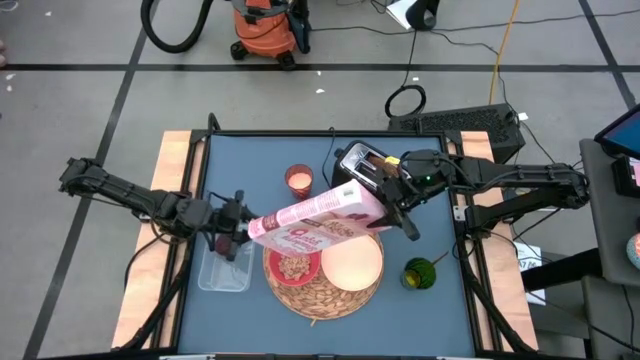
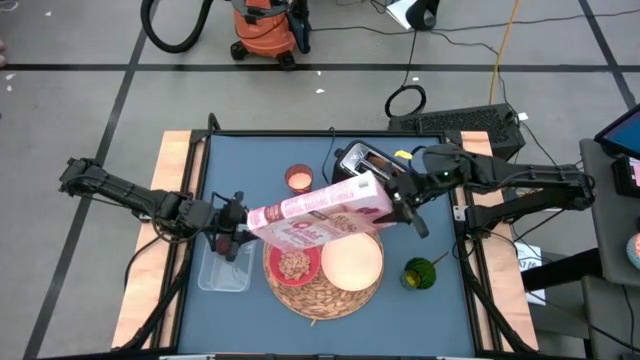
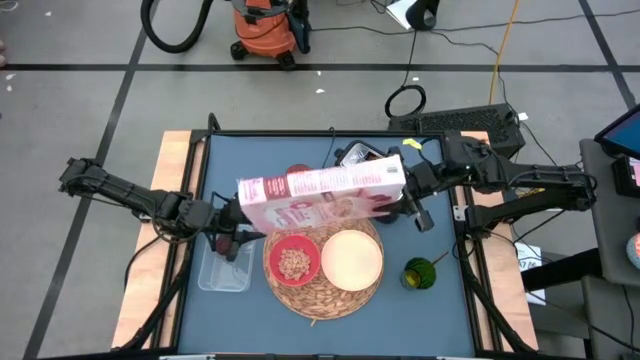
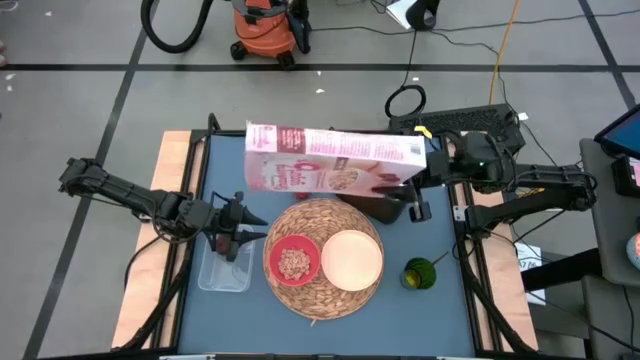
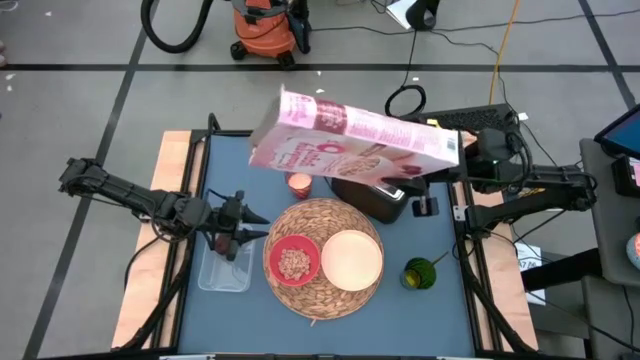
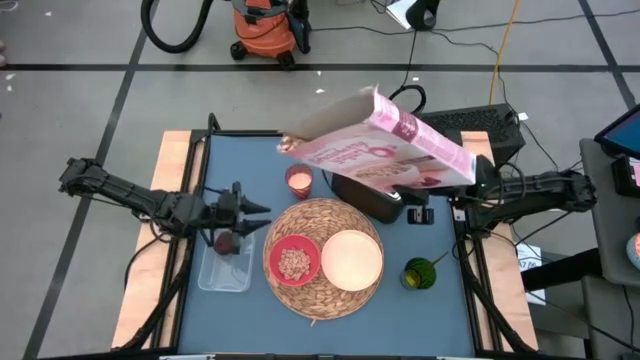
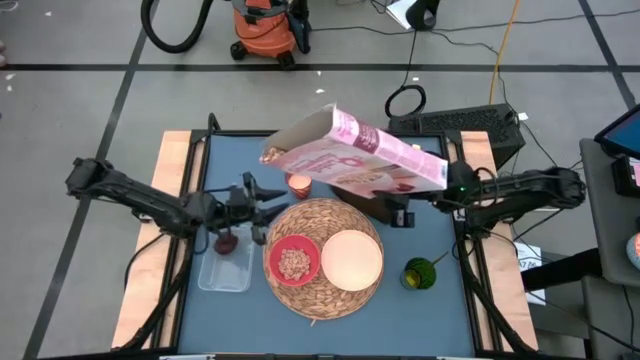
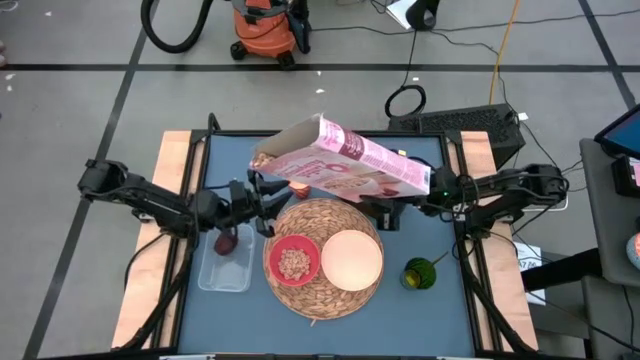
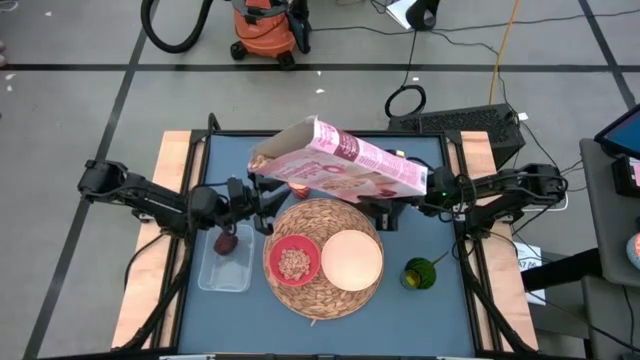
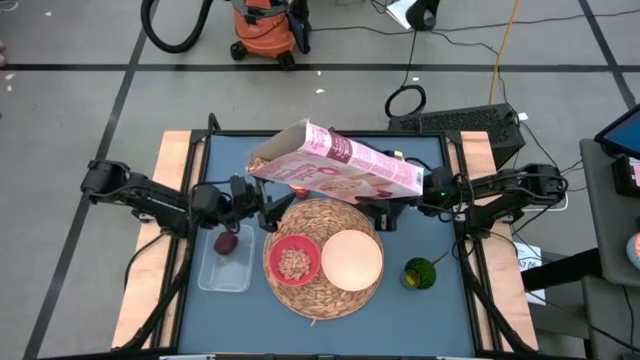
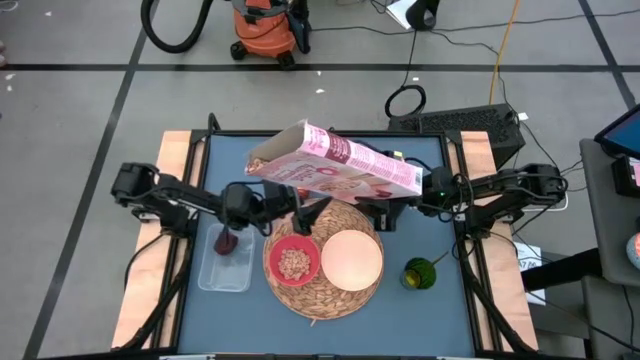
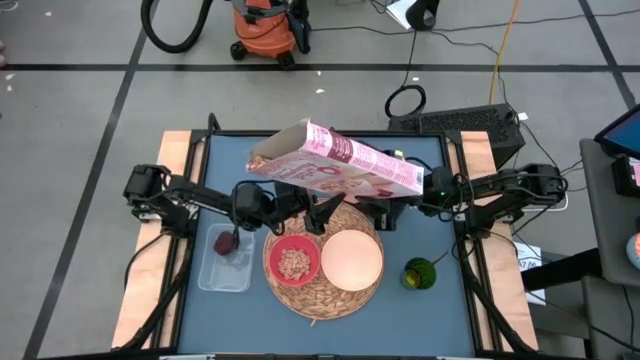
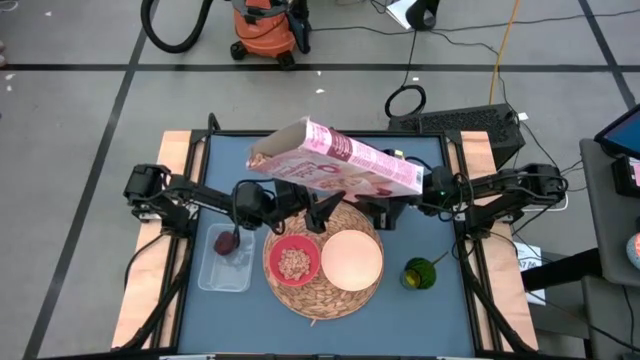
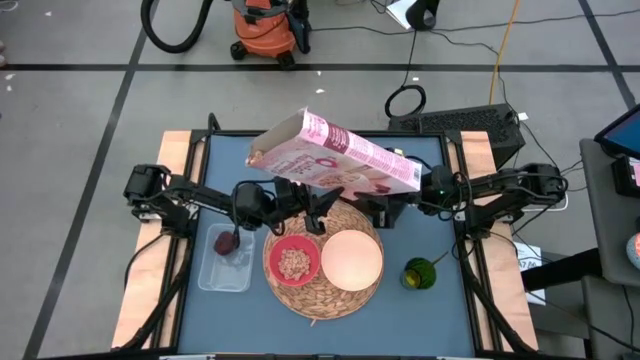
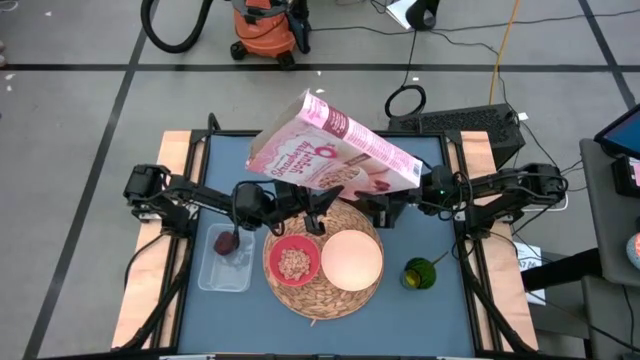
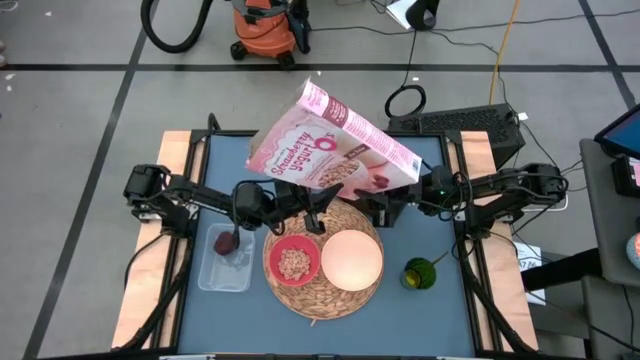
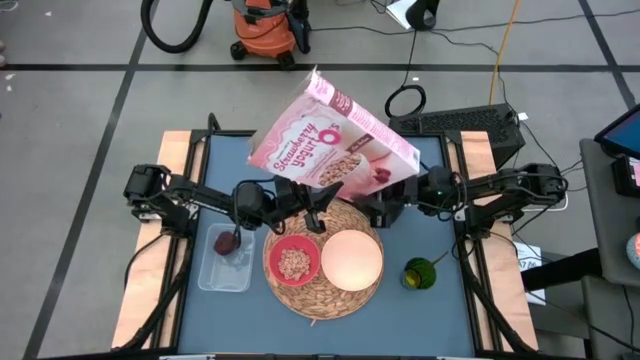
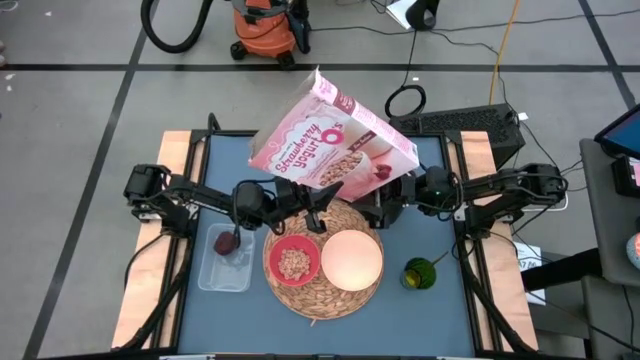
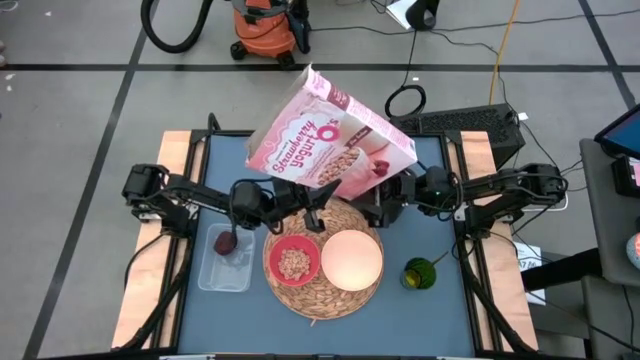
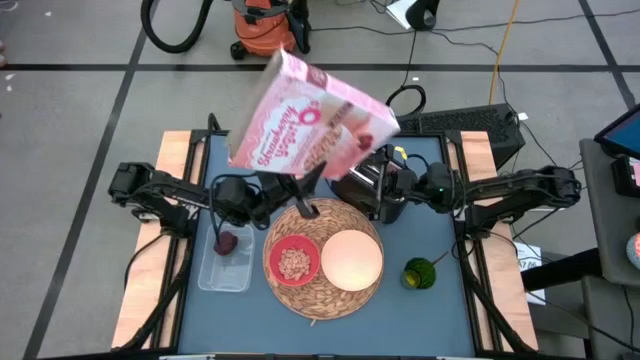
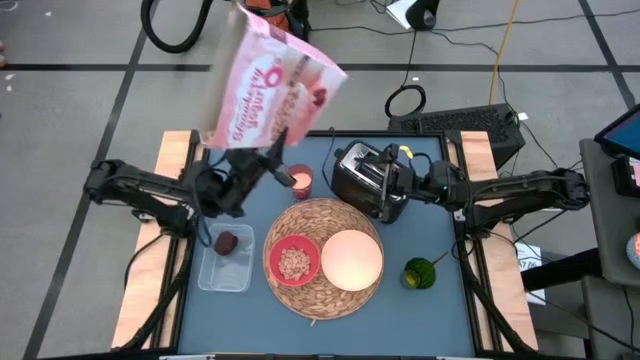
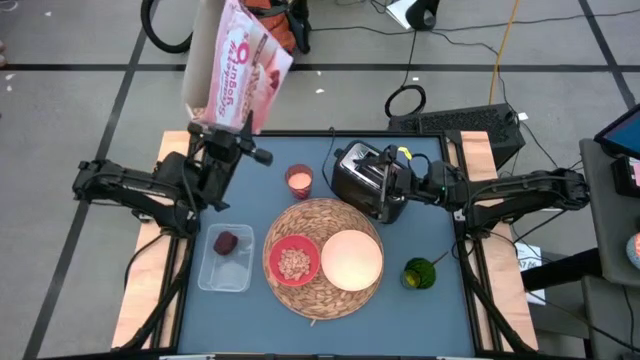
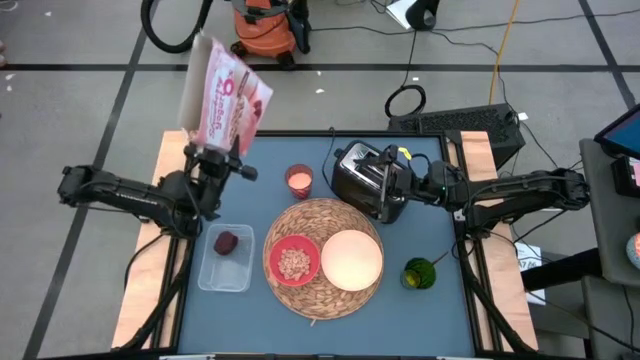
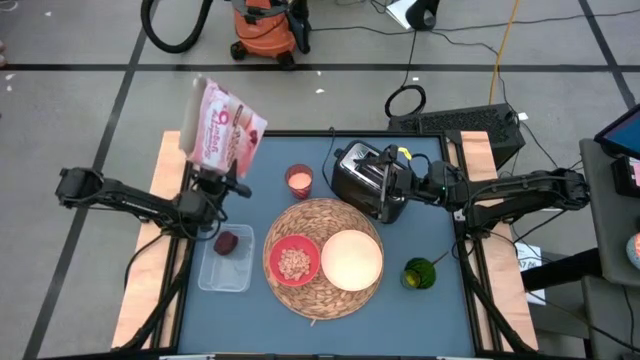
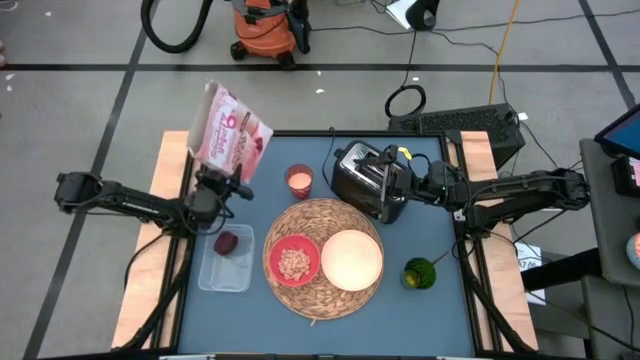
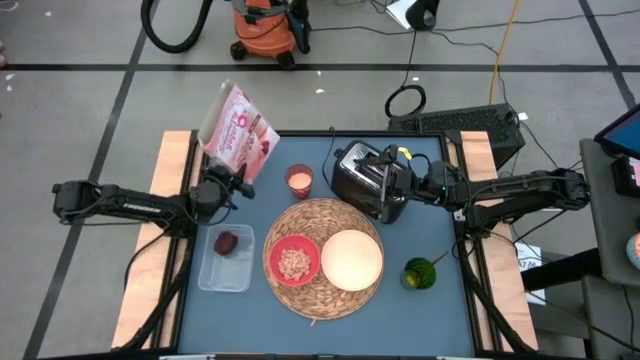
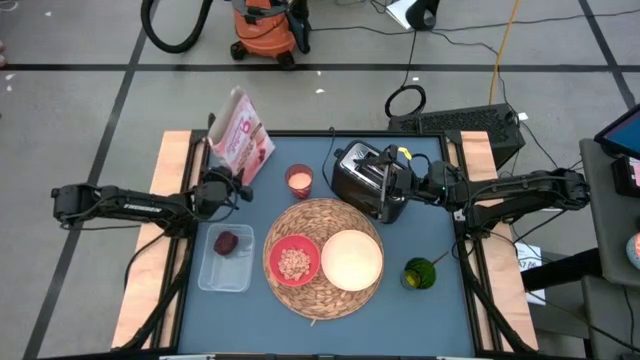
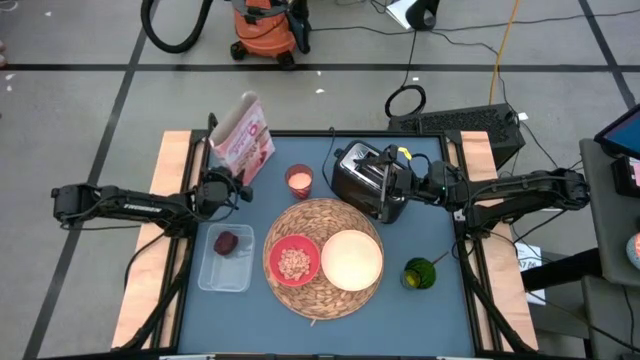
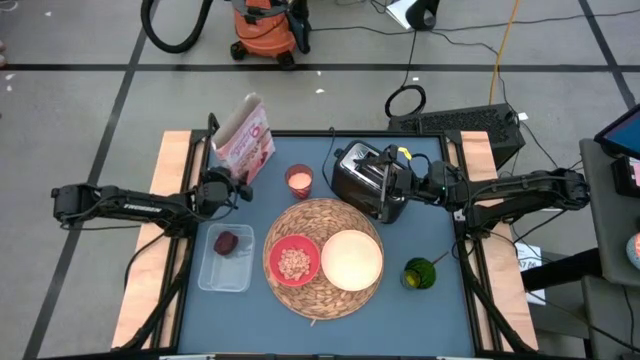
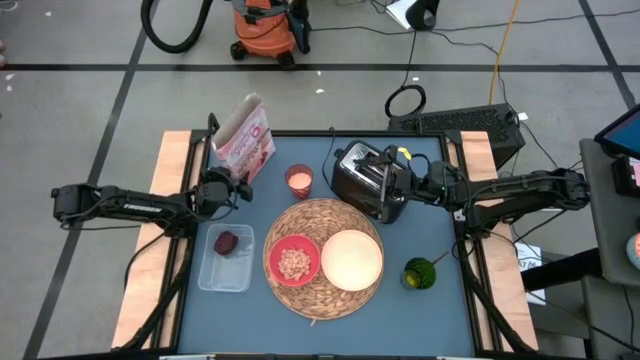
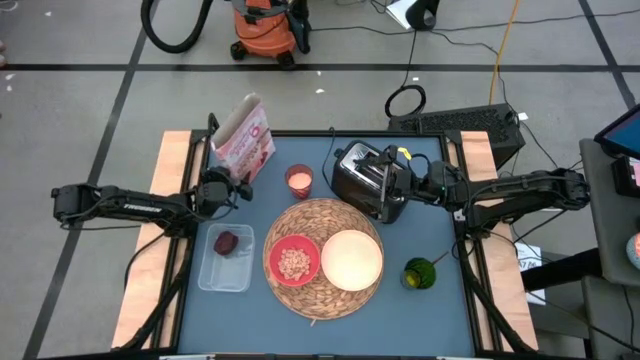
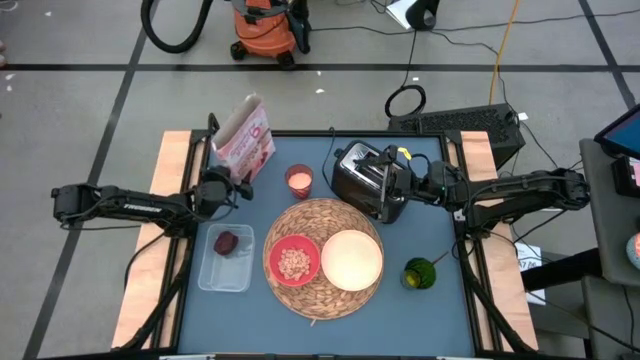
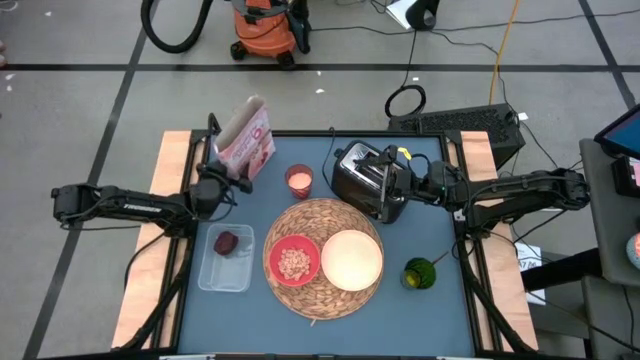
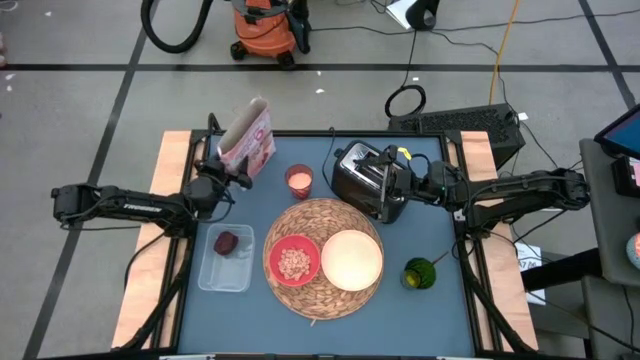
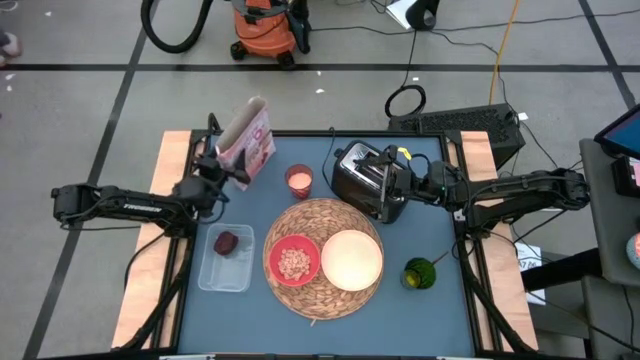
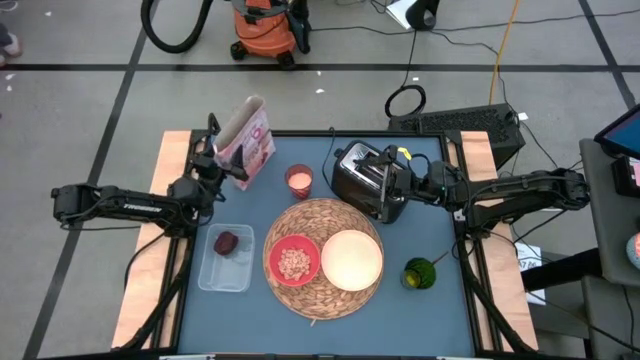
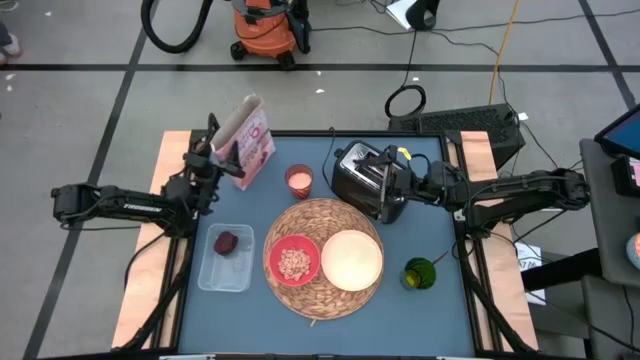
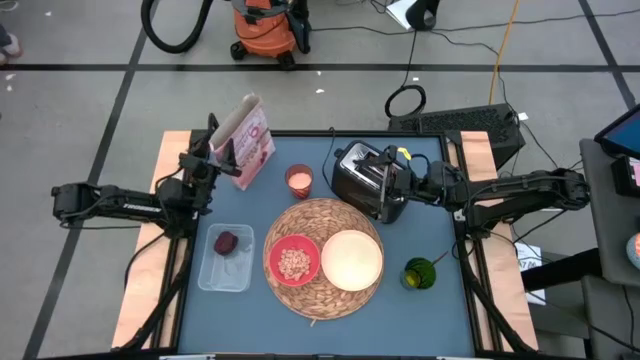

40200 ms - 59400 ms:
Task: Arrange a breakfast setting
Pour the cereal from the cereal box into the orange bowl
